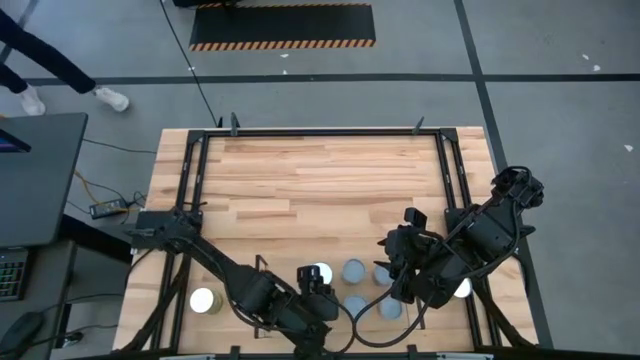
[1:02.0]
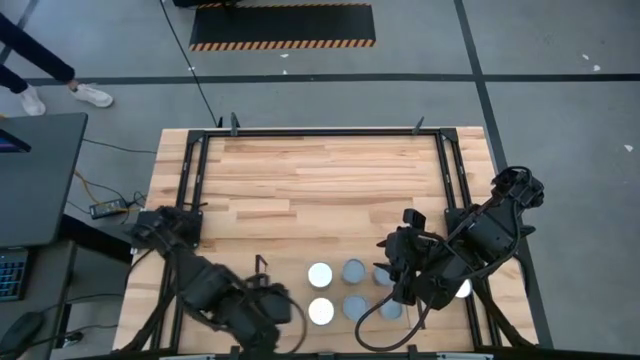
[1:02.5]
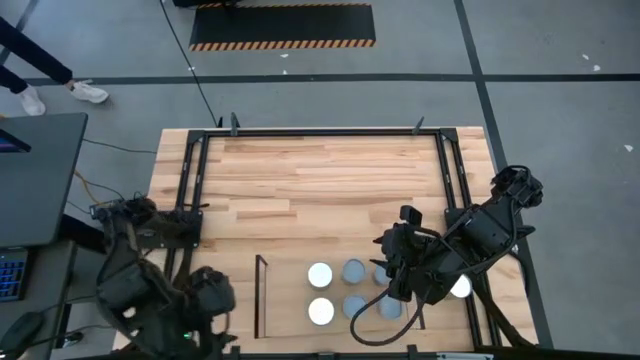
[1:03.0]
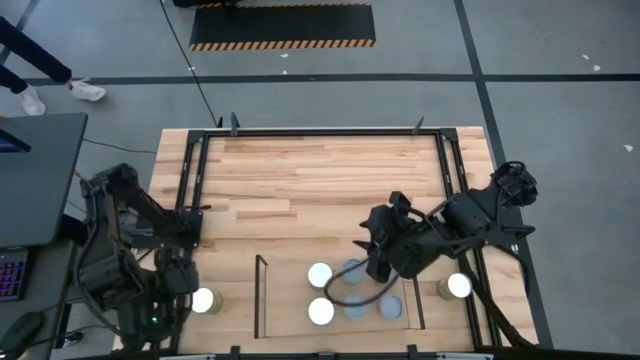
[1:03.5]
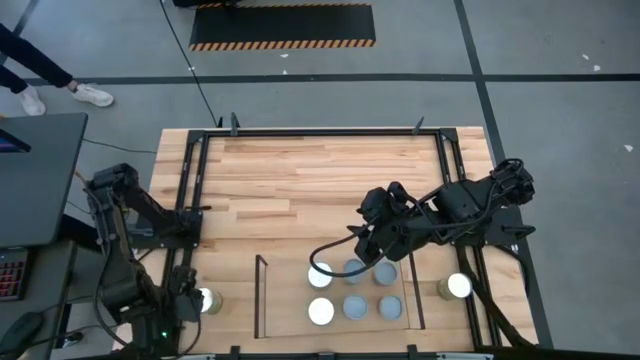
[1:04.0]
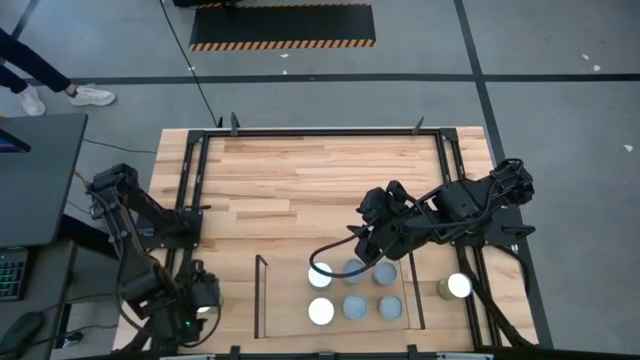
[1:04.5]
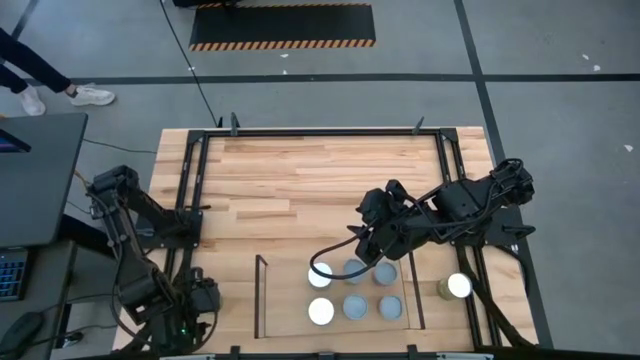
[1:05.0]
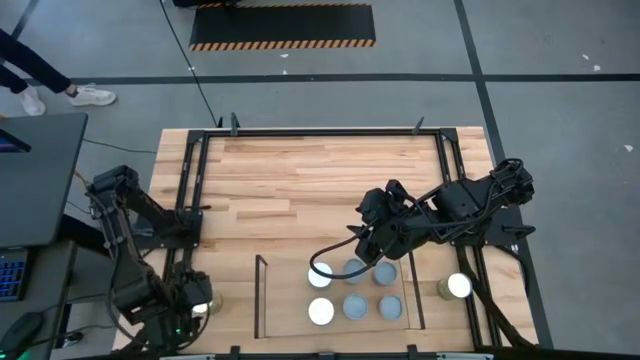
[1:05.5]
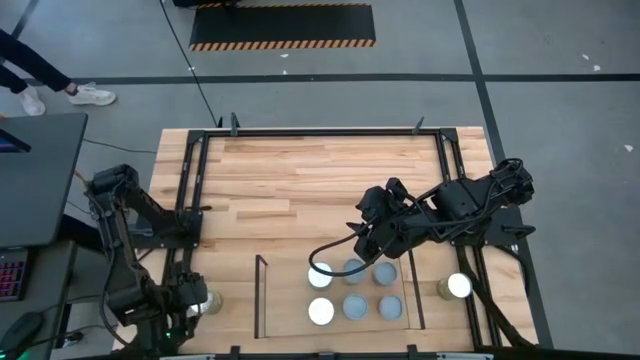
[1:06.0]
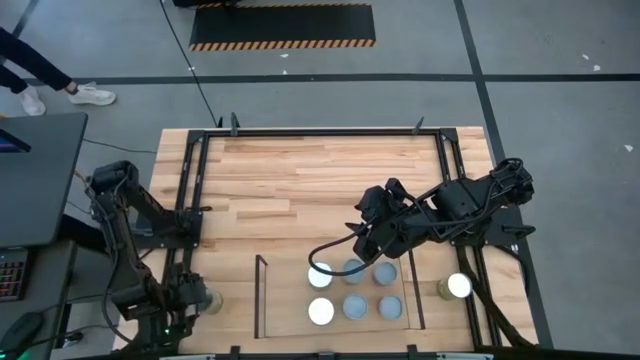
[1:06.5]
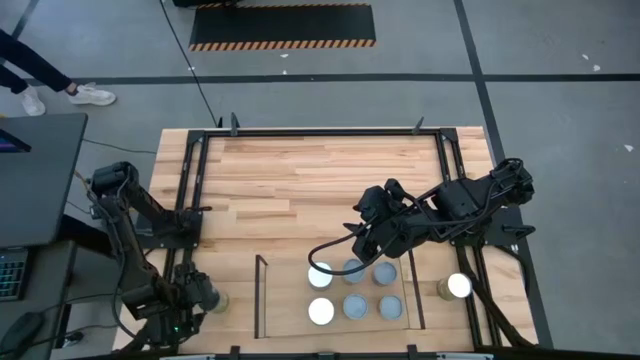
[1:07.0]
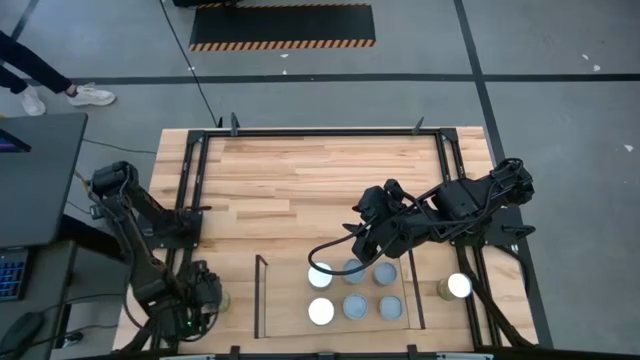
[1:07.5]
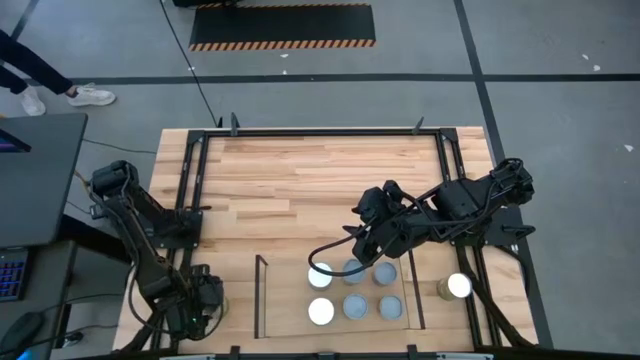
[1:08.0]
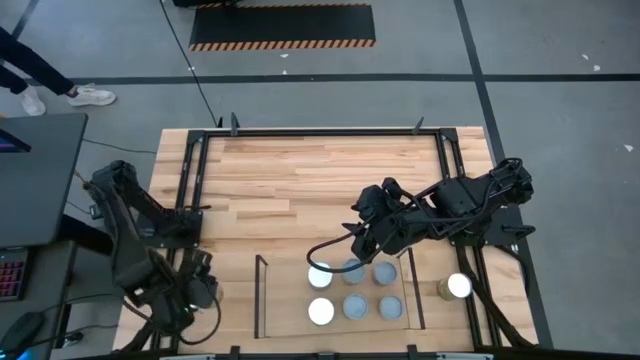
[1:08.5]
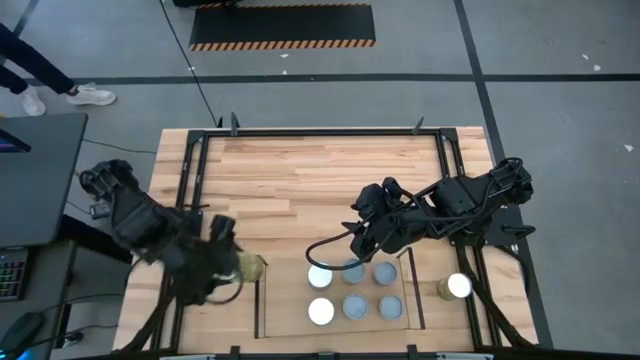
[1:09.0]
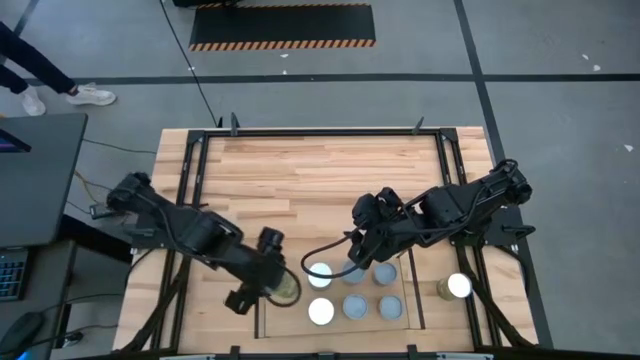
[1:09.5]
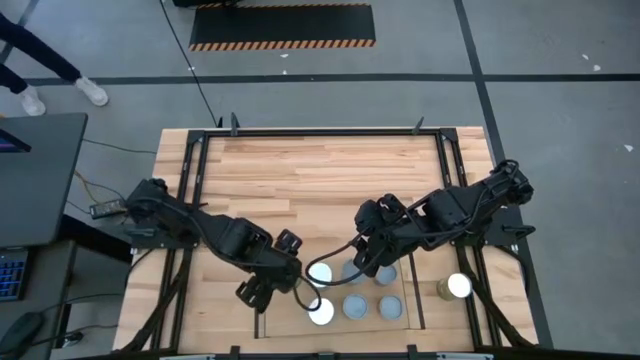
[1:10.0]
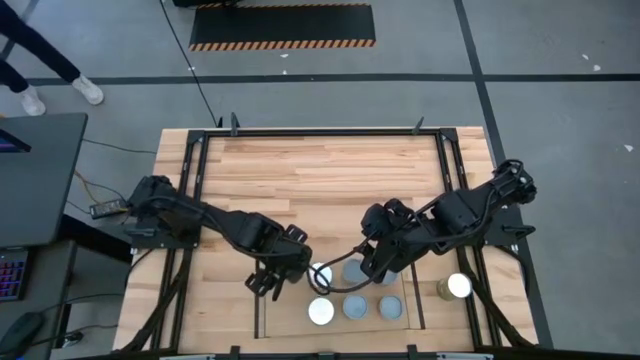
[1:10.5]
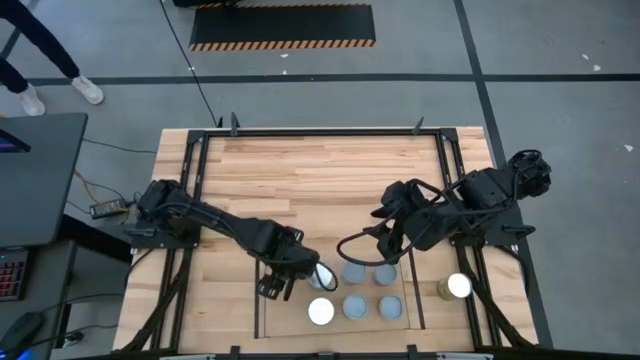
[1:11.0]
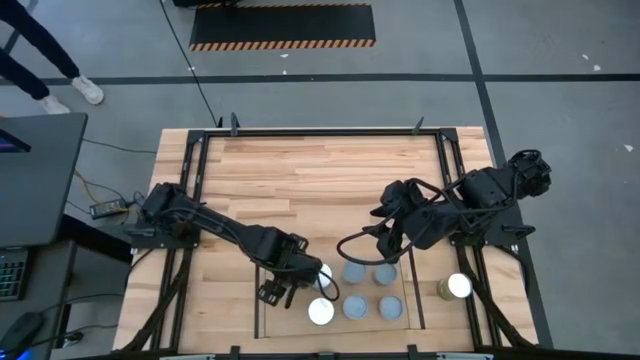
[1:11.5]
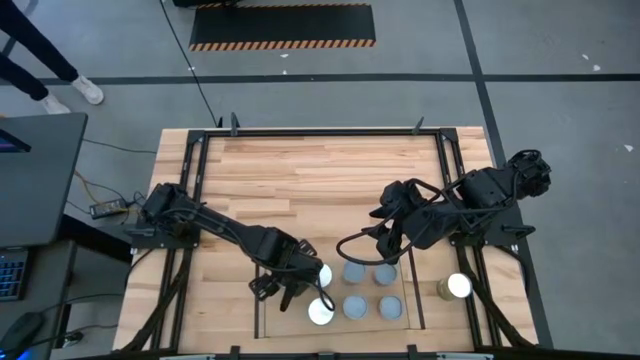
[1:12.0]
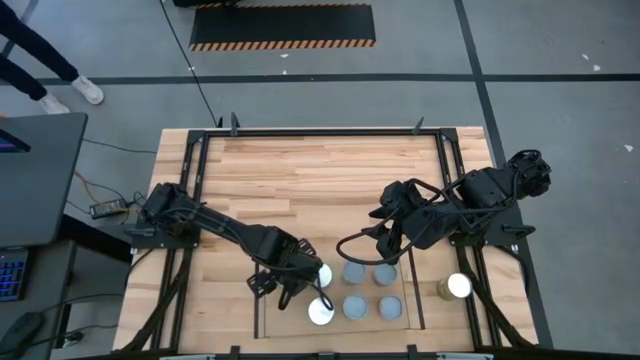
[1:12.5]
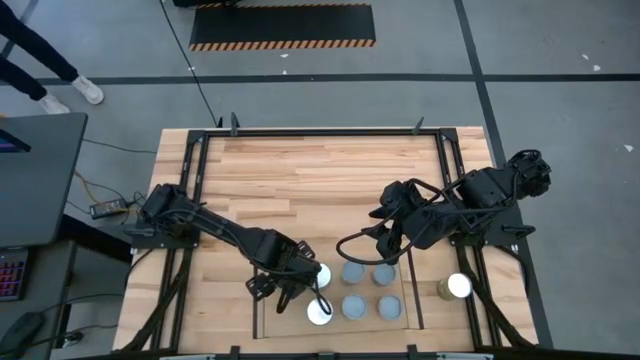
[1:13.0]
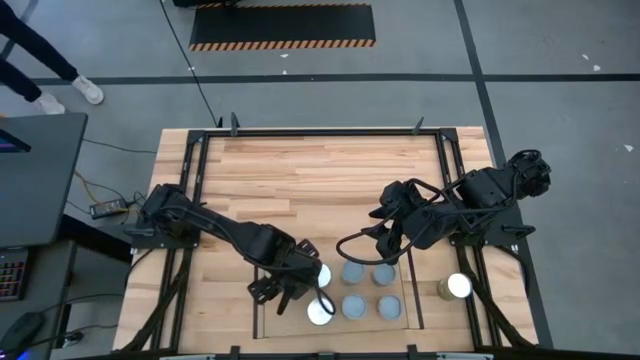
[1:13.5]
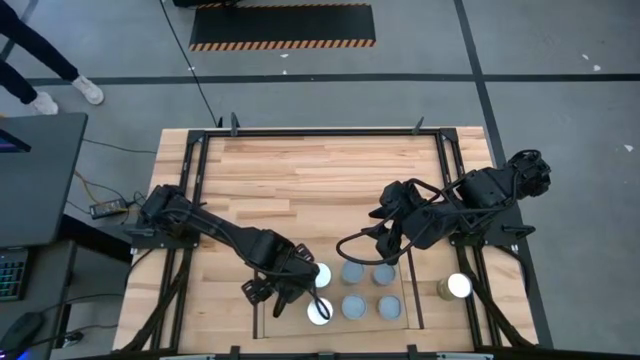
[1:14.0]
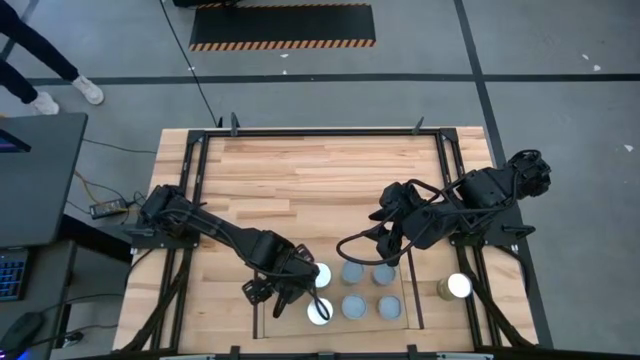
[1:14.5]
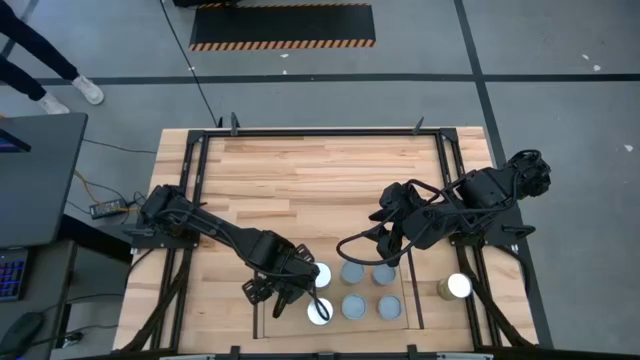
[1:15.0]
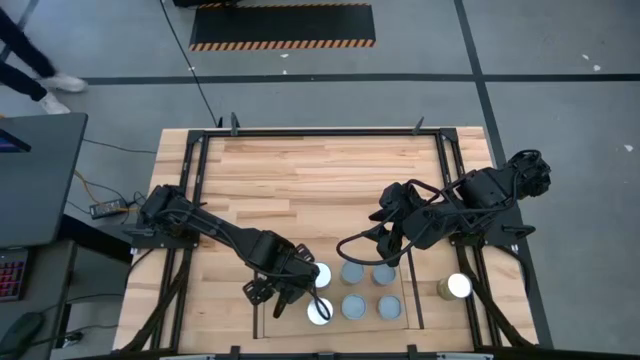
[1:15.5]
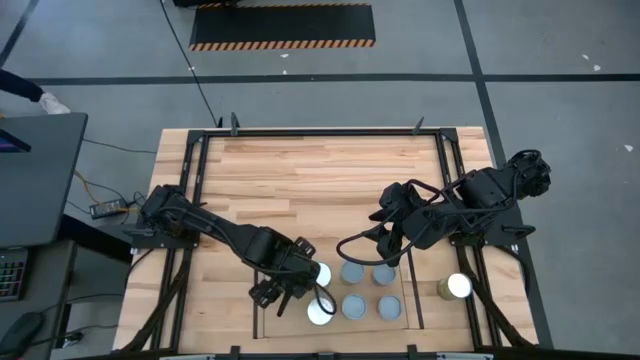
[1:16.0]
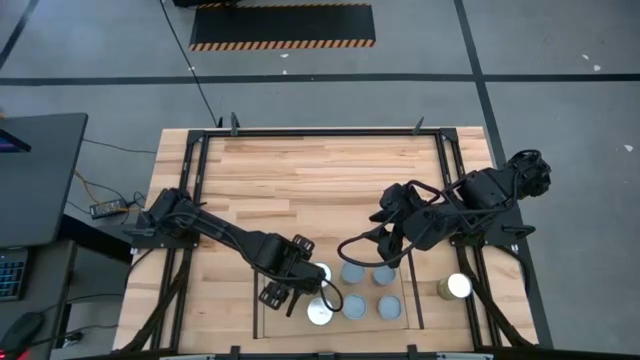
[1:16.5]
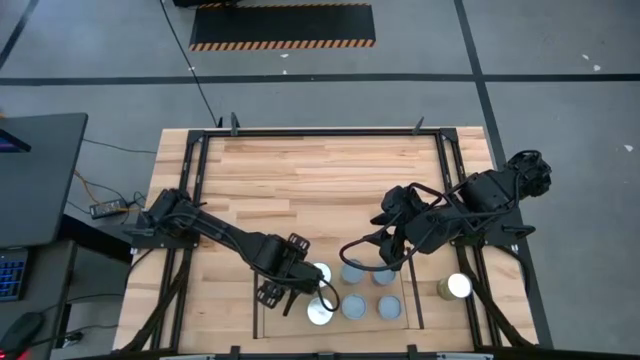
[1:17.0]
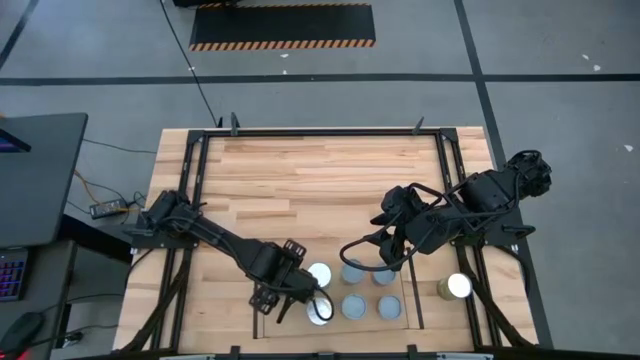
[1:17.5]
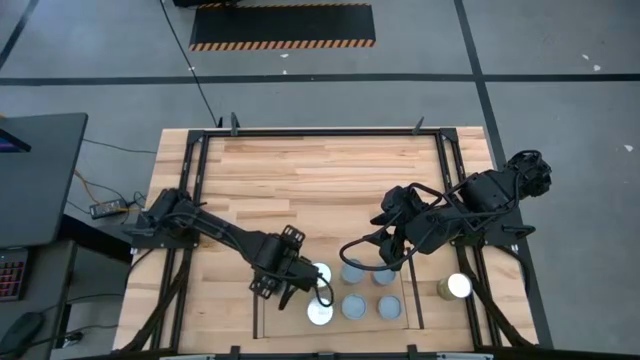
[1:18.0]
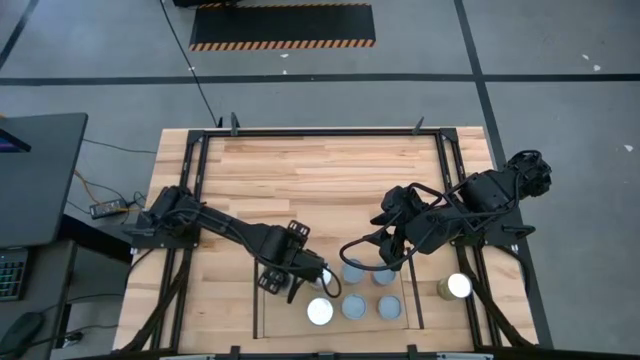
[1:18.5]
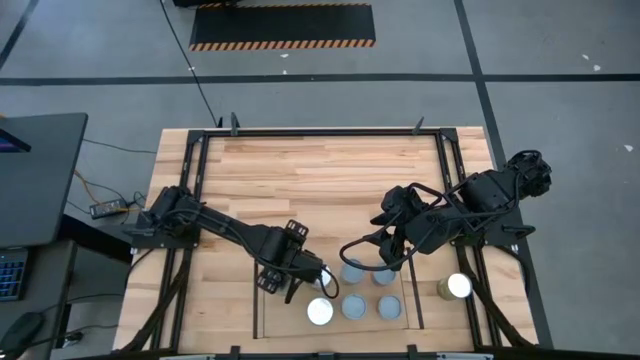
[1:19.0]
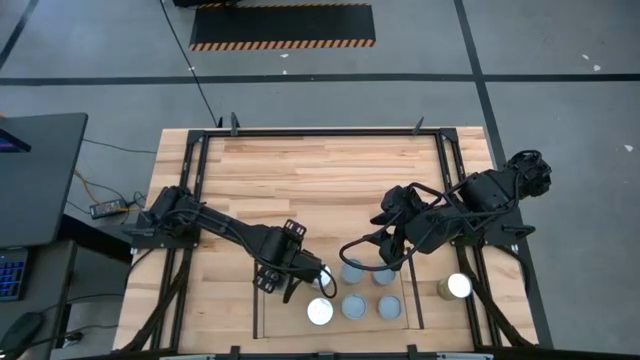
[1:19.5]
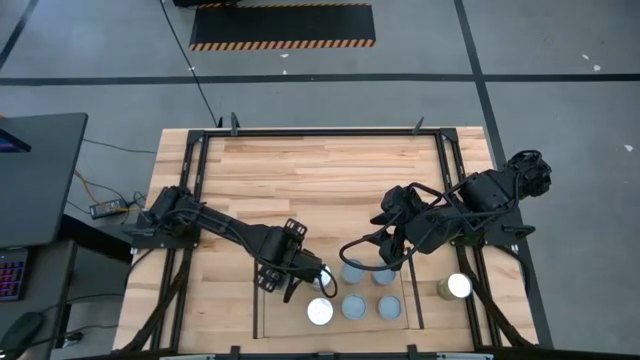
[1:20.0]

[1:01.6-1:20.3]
Task: Pick and place cans onto a shelf
Put the canned pears on the left shelf

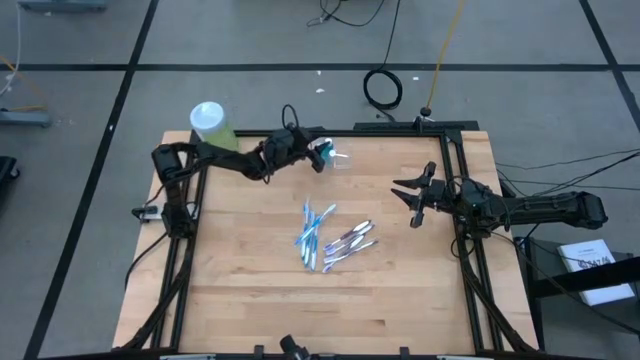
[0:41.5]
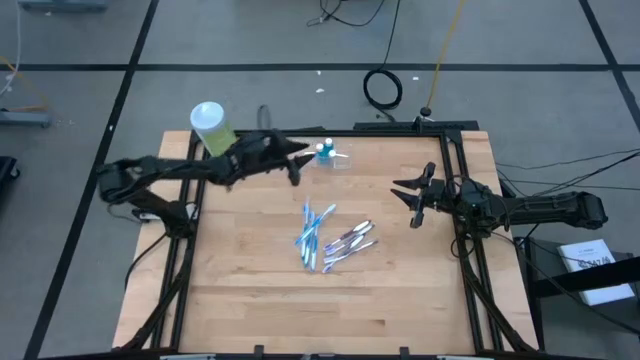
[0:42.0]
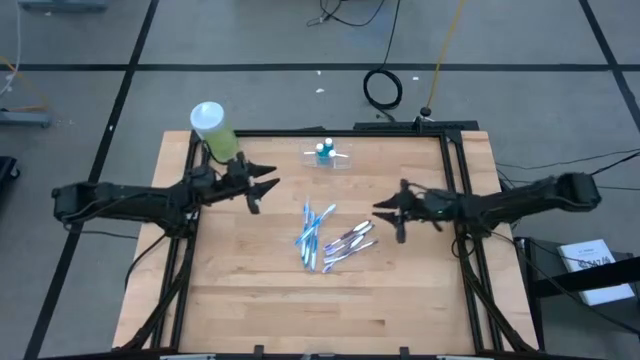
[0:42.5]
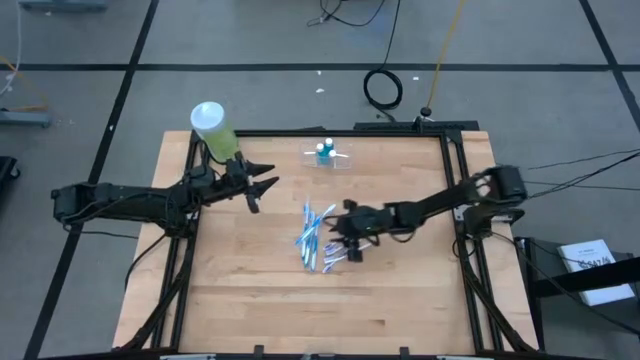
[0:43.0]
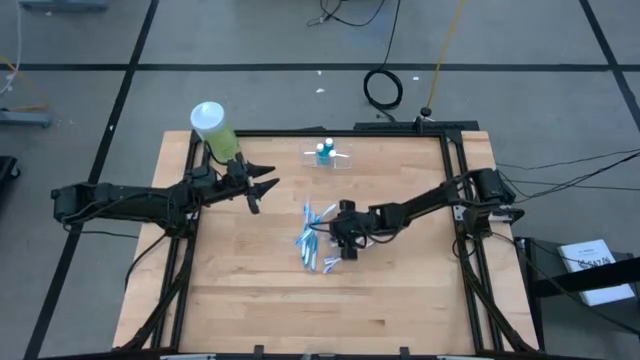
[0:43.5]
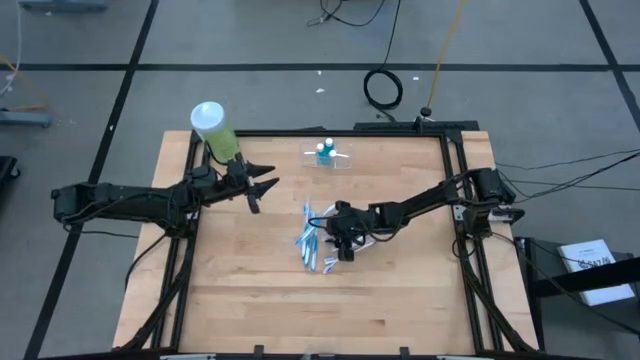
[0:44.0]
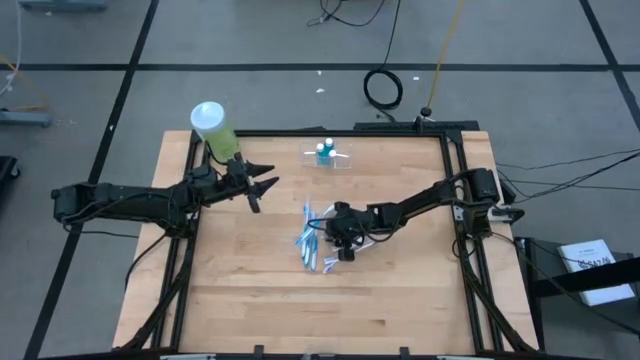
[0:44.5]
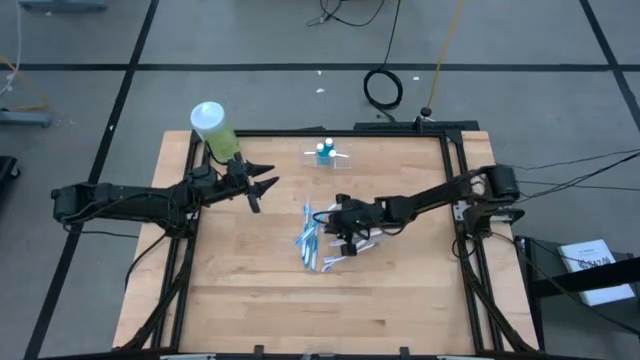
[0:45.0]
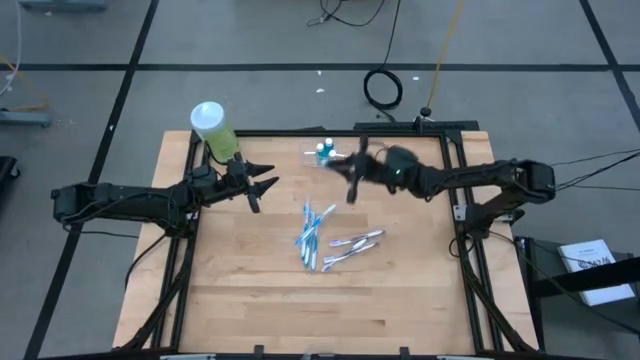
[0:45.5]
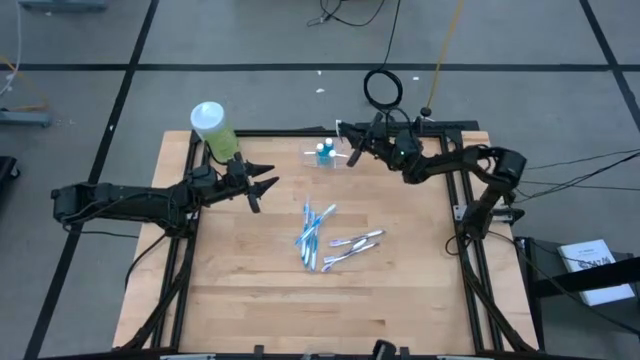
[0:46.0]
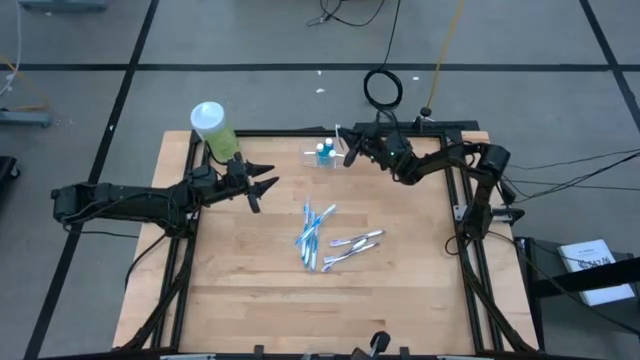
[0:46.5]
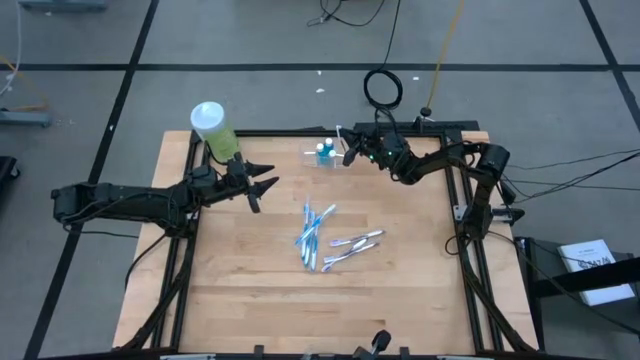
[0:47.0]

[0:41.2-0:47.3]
Task: Pick & Place toothbrushing station
Put the purple toothbrush into the transparent organizer
